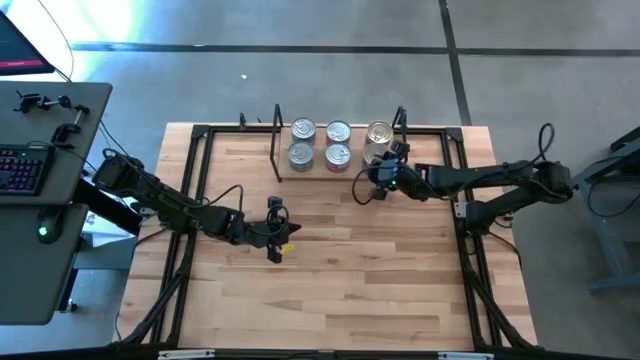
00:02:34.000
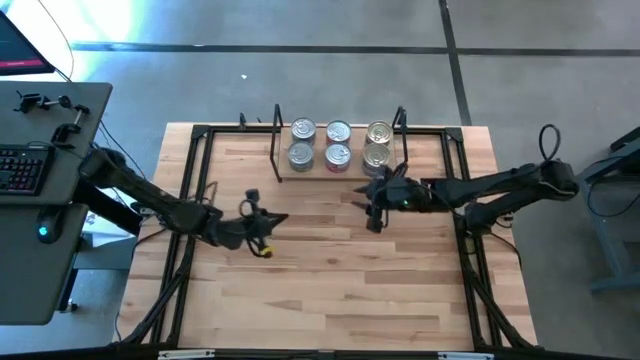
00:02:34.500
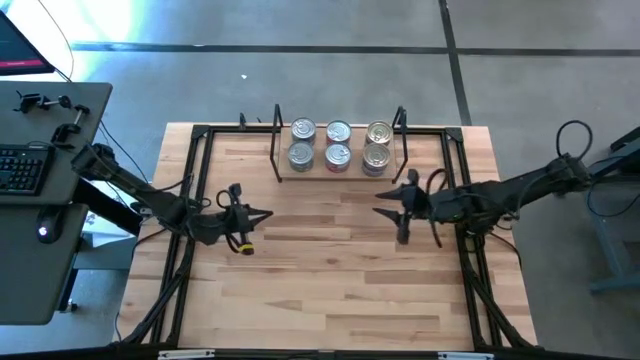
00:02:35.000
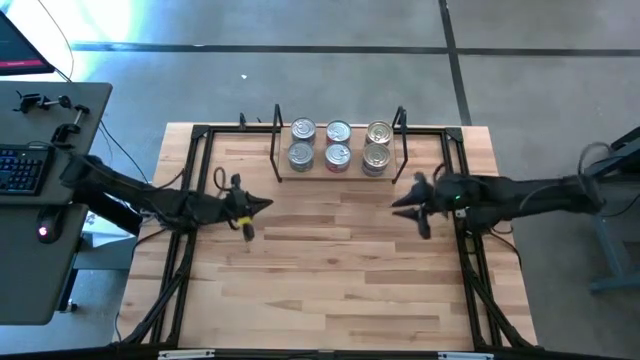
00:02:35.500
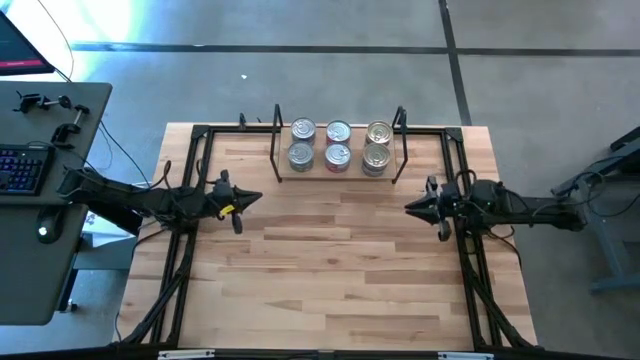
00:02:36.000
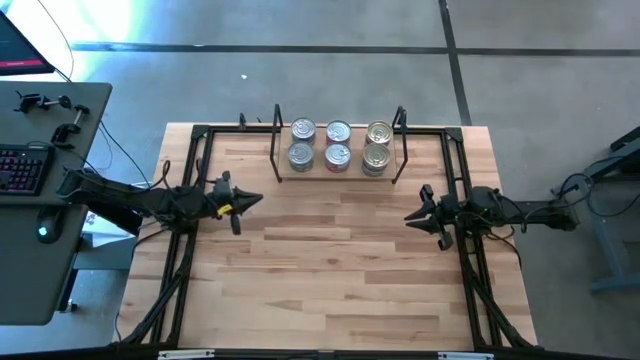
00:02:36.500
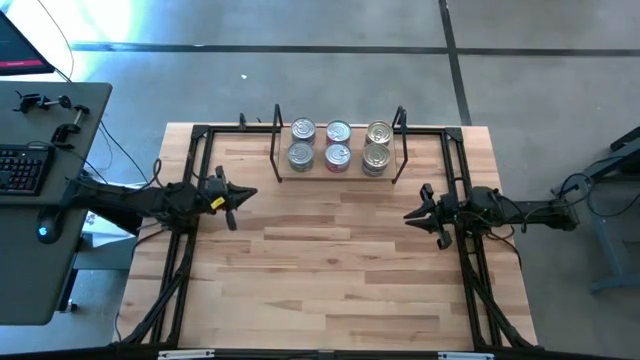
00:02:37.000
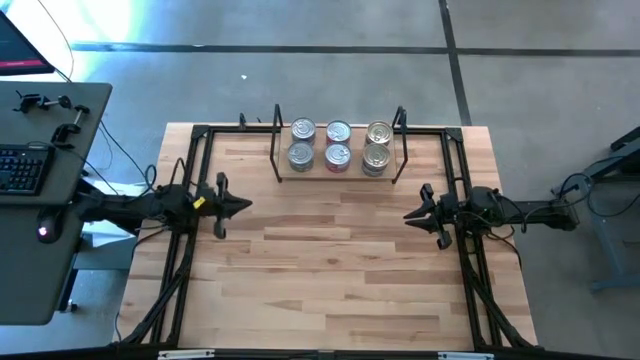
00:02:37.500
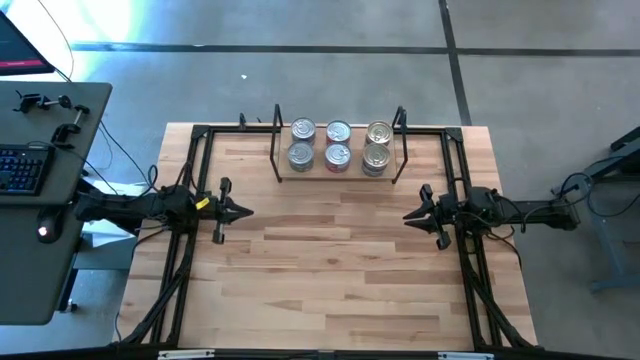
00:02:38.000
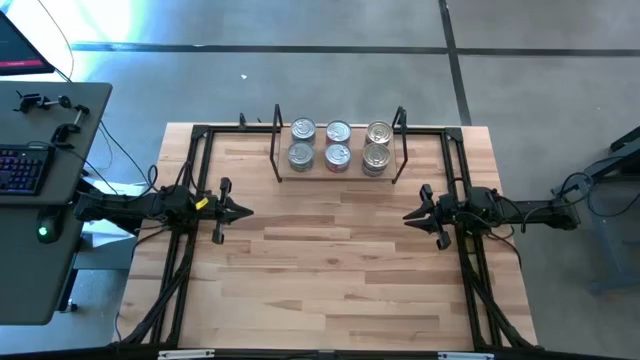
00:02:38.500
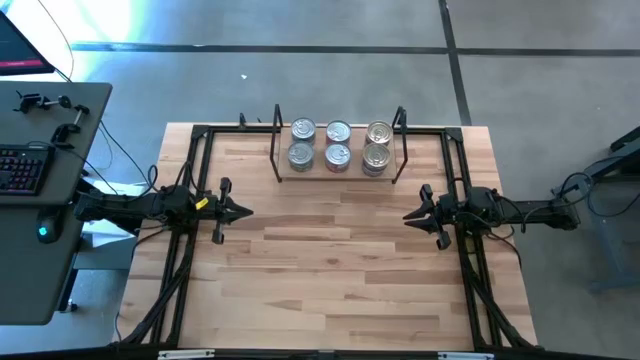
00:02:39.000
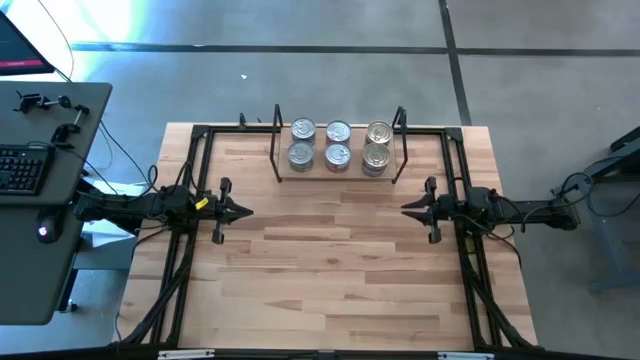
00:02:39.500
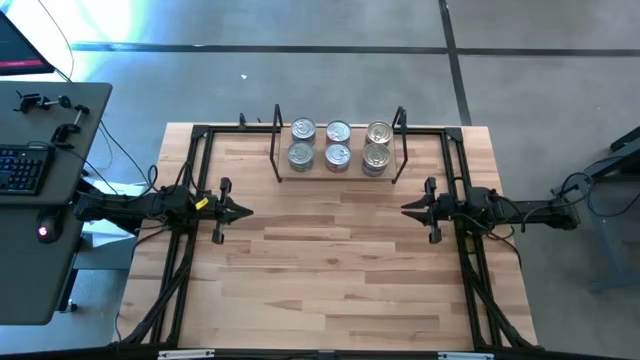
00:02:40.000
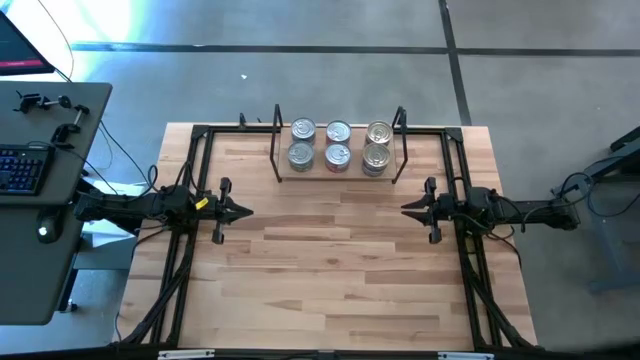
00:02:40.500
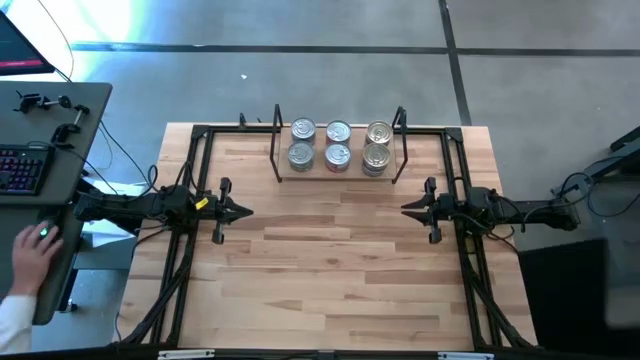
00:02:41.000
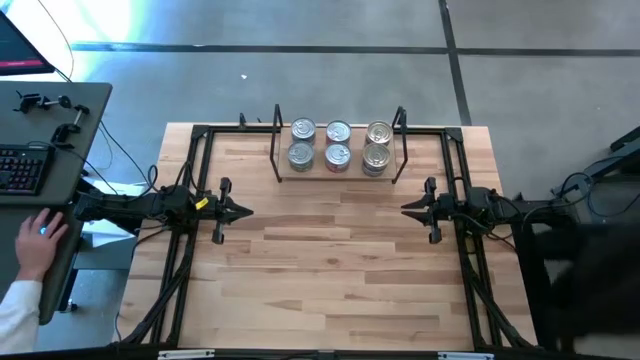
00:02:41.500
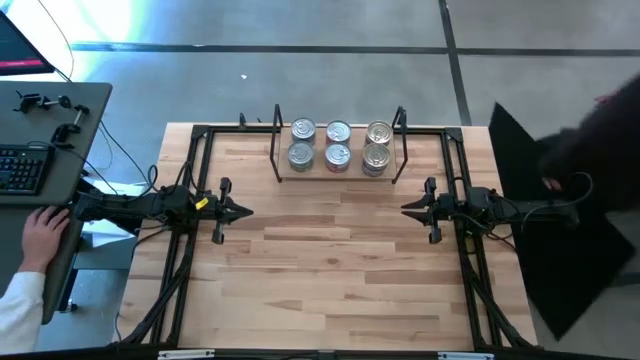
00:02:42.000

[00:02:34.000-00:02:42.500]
Task: Stack canned seafood by type on shelf
Return to Home Position

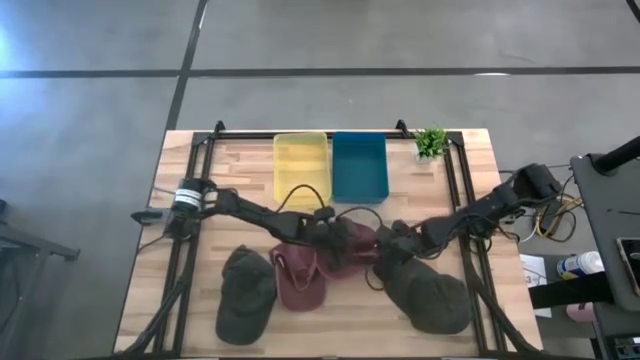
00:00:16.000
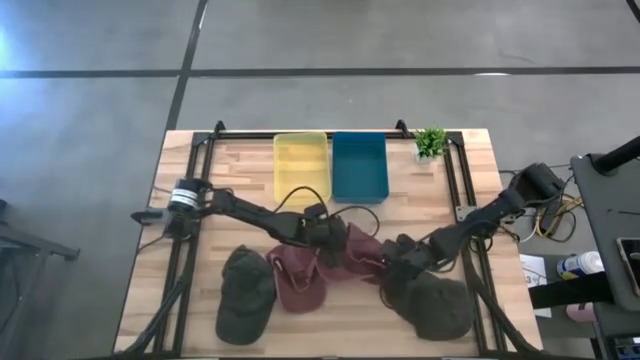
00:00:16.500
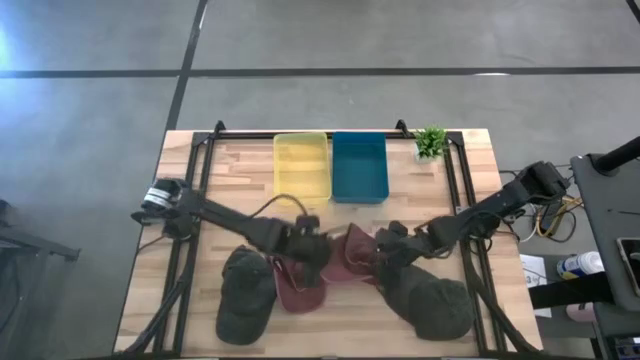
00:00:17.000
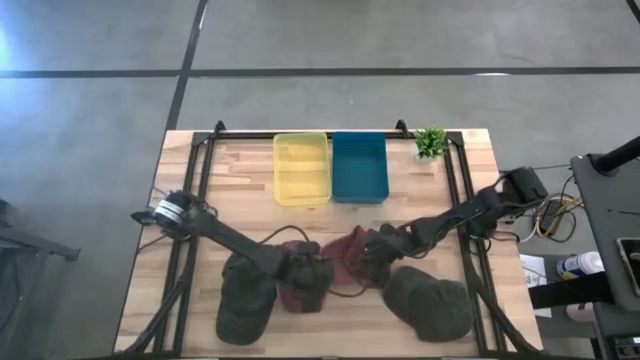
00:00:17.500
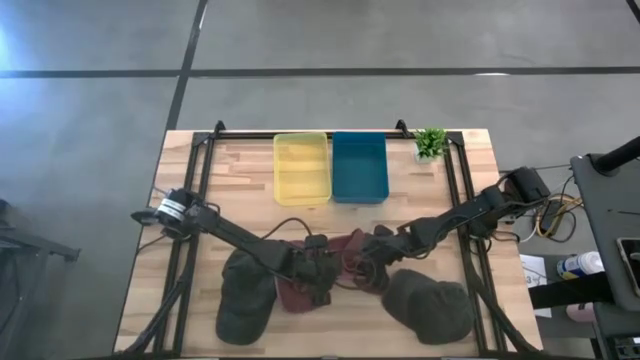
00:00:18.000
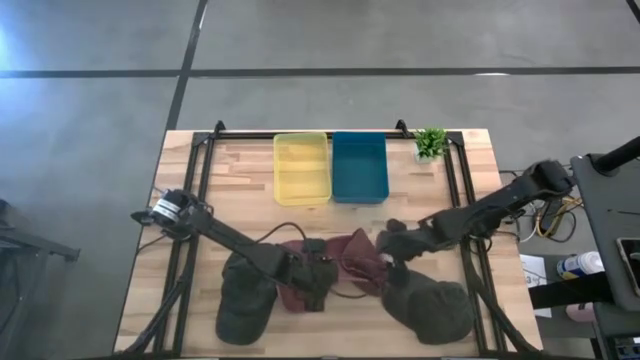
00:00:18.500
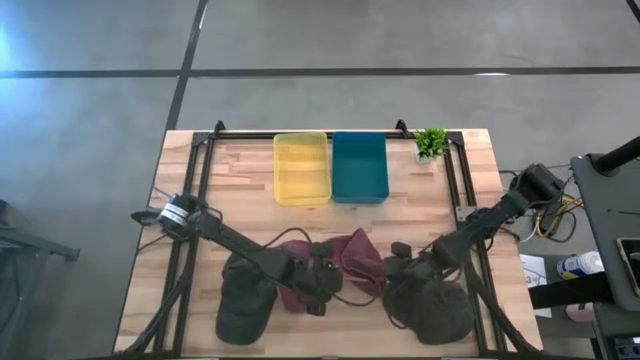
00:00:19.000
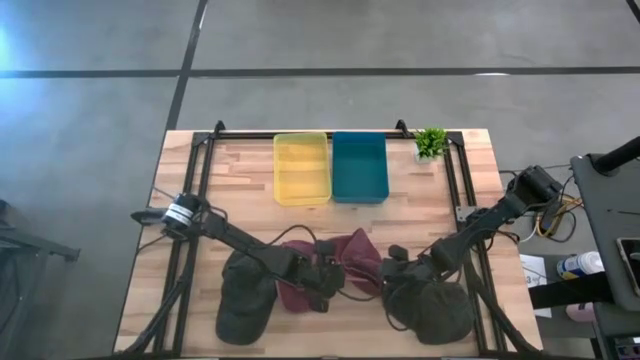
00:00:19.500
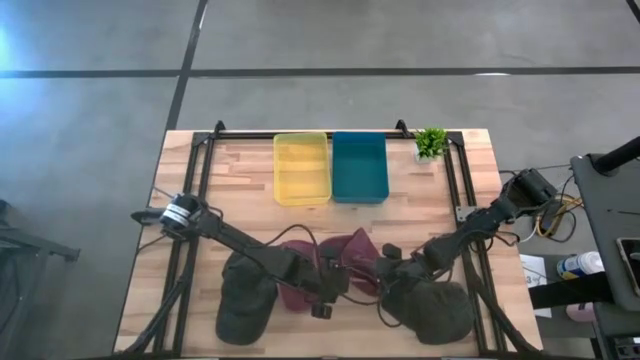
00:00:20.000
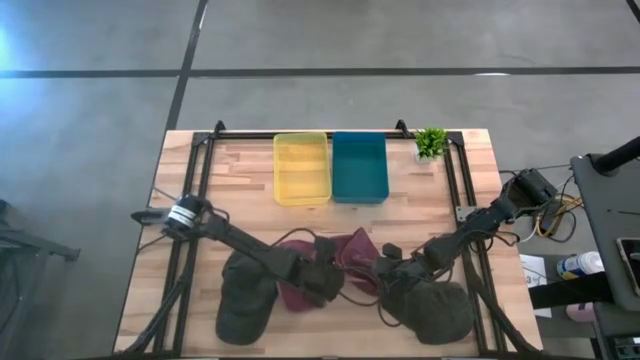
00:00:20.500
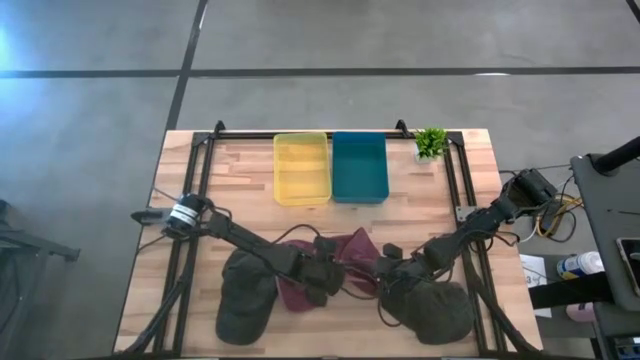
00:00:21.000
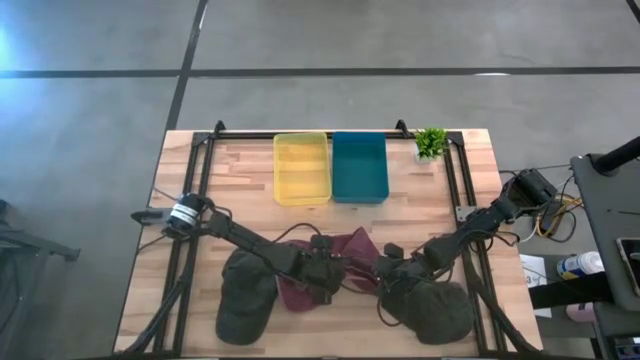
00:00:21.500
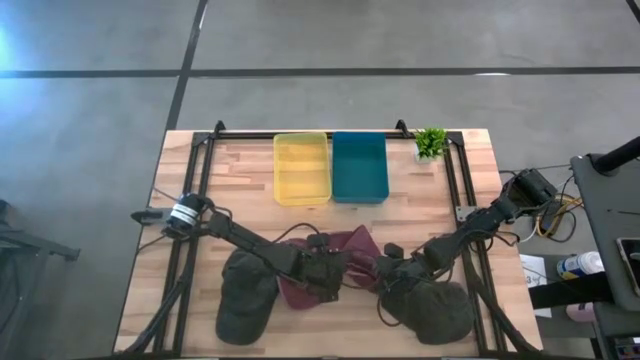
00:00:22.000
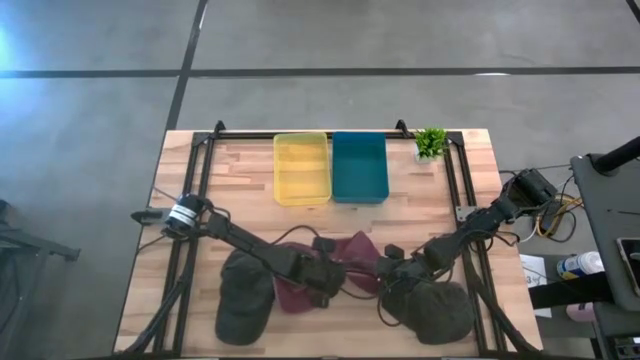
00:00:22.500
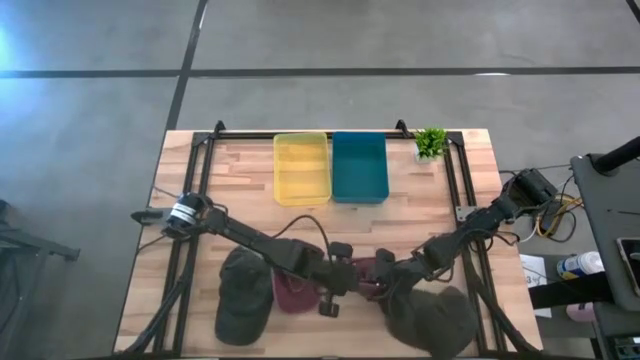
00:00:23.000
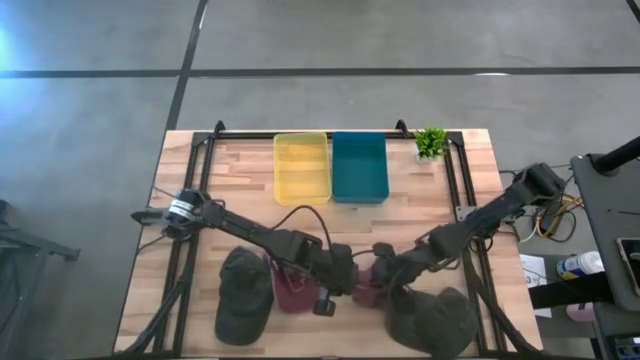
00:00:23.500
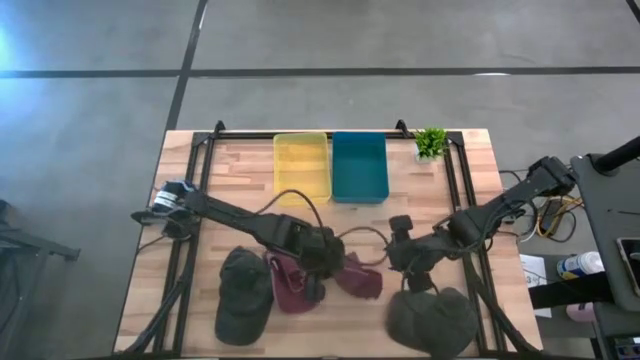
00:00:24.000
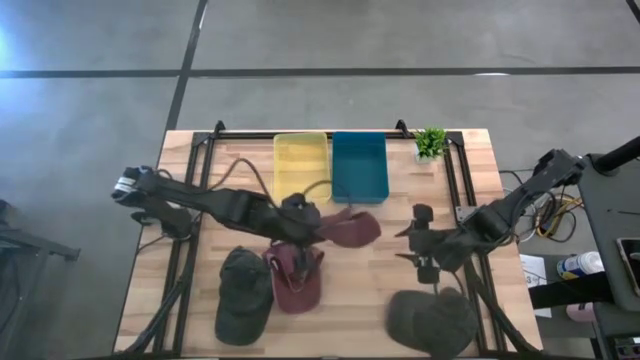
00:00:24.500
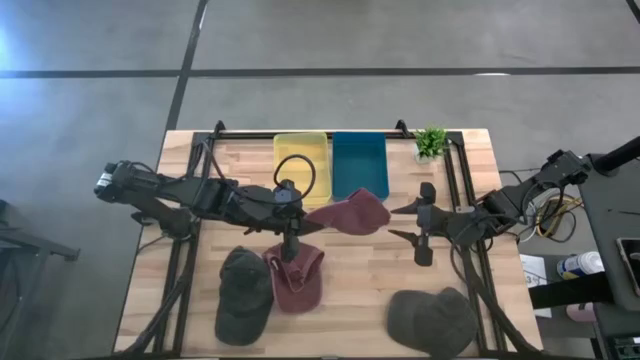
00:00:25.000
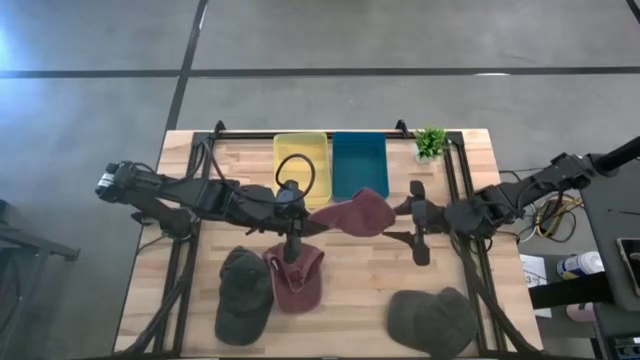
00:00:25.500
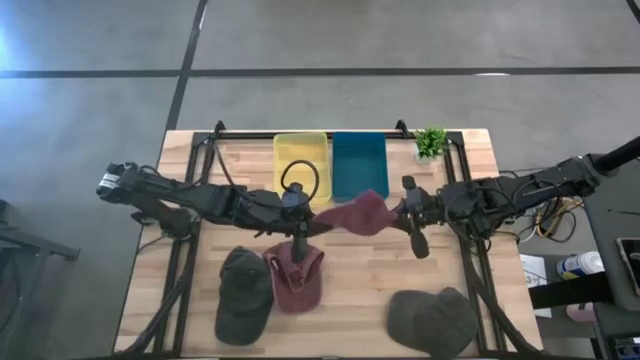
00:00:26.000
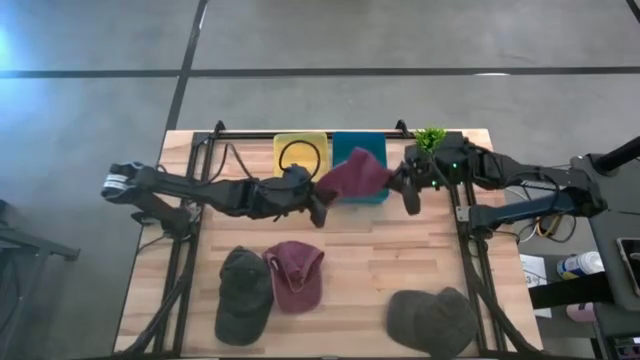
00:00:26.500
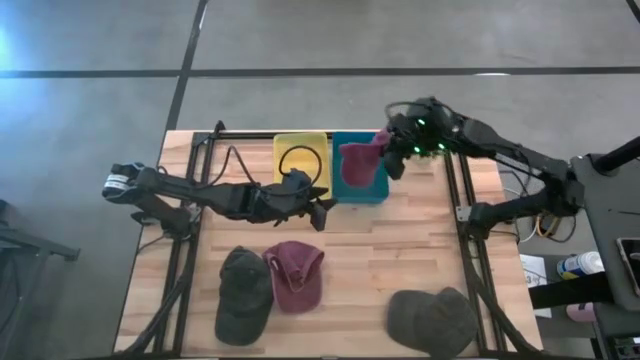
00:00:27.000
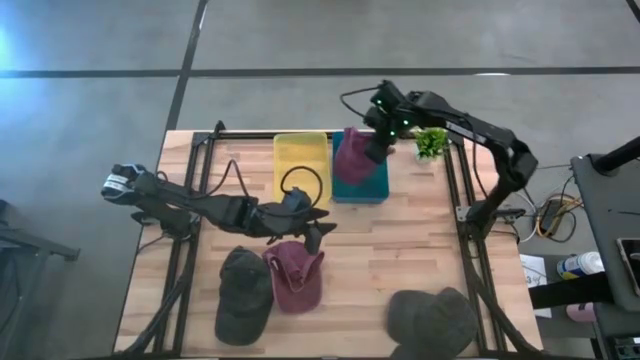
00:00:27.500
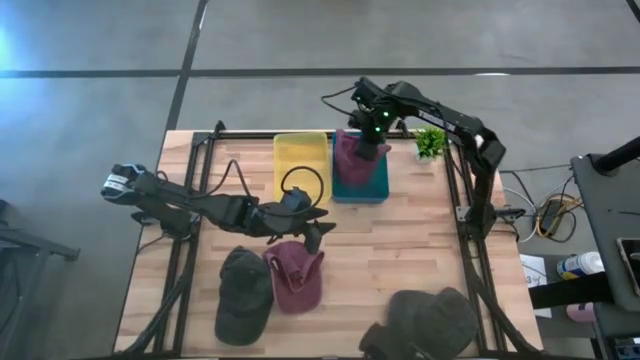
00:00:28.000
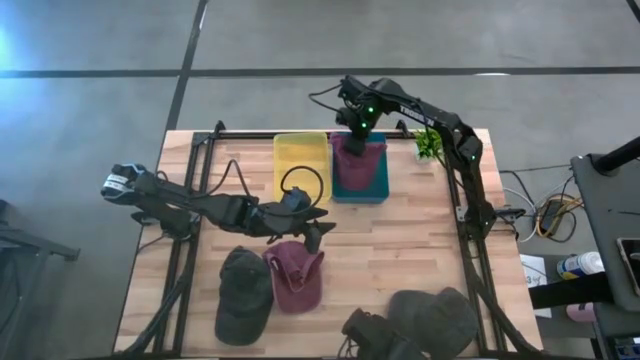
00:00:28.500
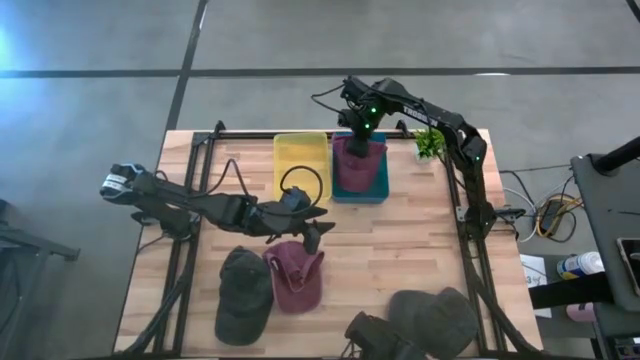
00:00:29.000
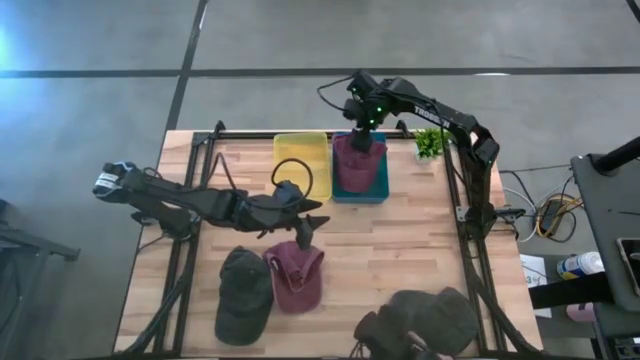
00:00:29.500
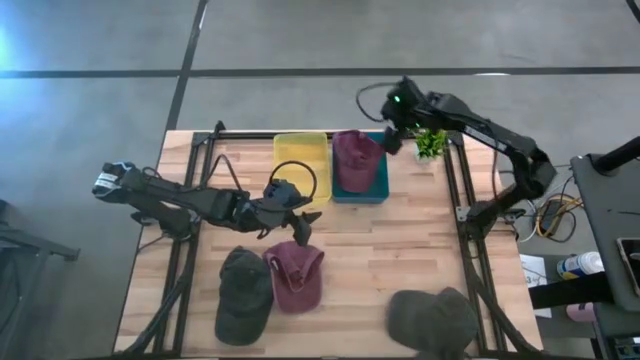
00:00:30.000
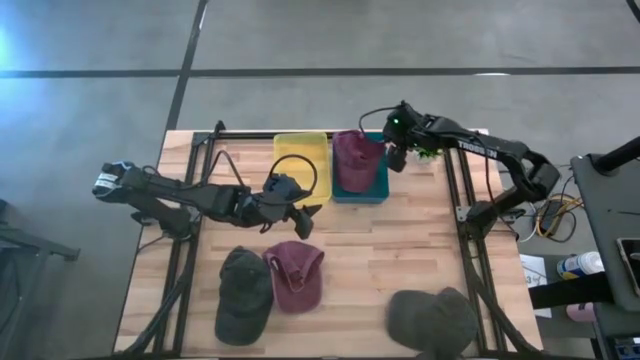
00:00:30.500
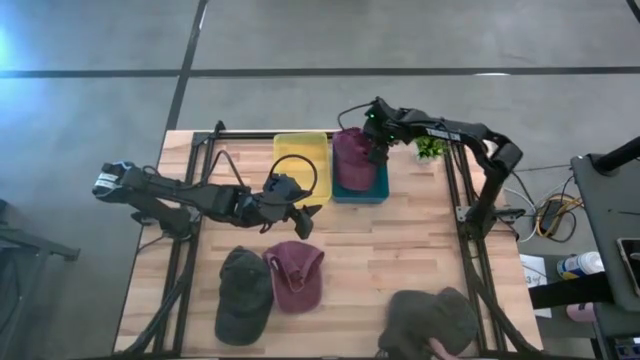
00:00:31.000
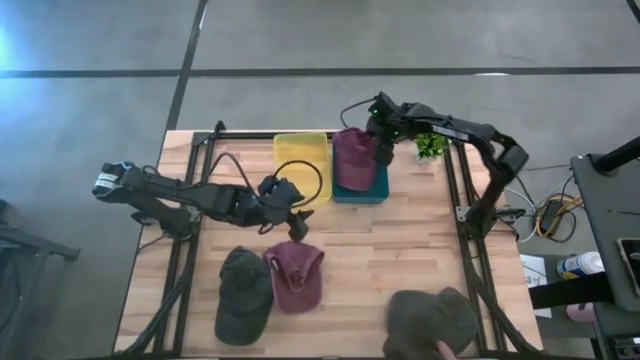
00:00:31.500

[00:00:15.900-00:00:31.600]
Task: Sort caps
Put the left red cap into the blue bin
